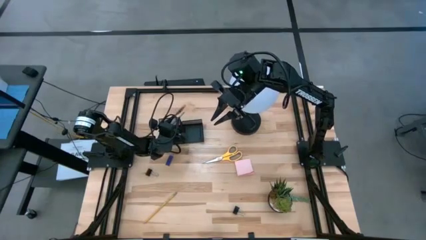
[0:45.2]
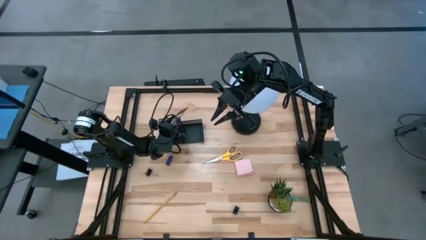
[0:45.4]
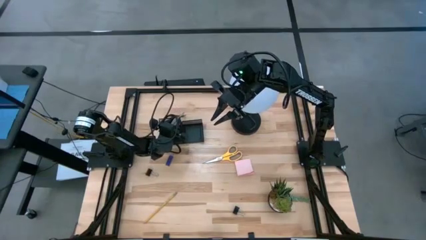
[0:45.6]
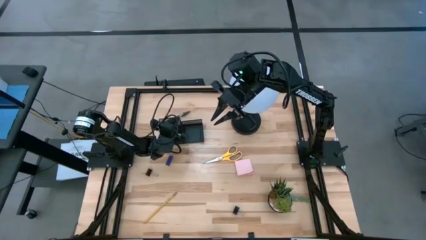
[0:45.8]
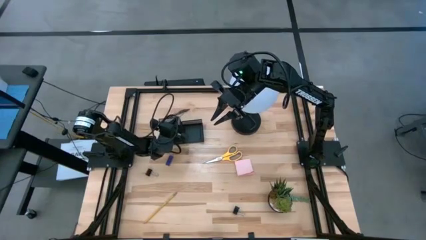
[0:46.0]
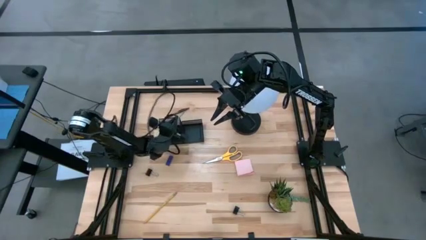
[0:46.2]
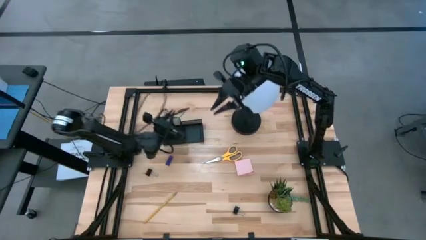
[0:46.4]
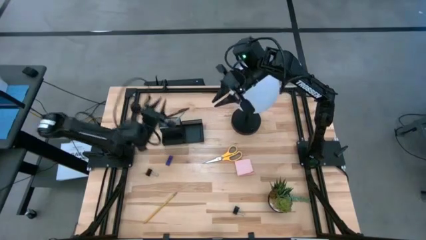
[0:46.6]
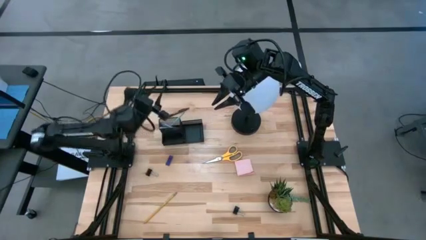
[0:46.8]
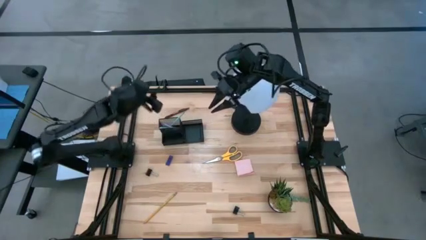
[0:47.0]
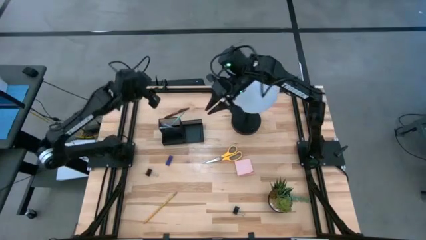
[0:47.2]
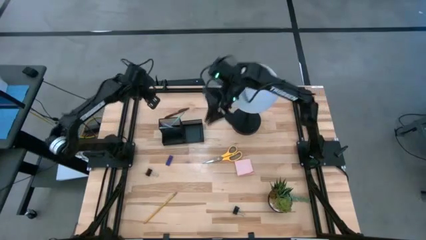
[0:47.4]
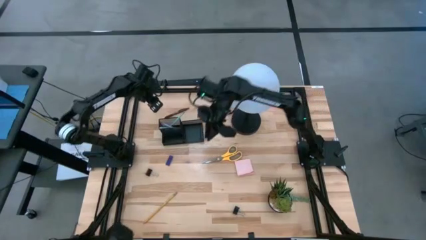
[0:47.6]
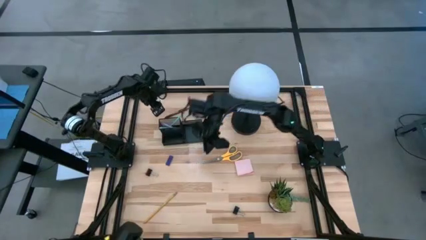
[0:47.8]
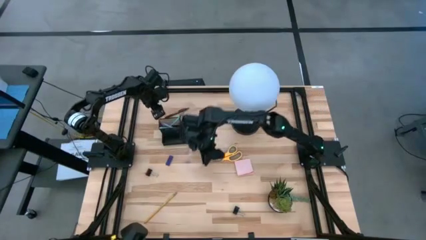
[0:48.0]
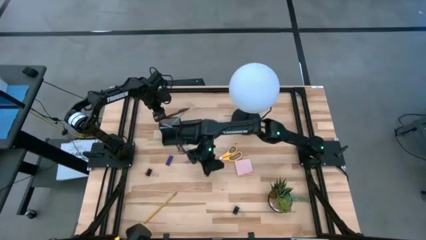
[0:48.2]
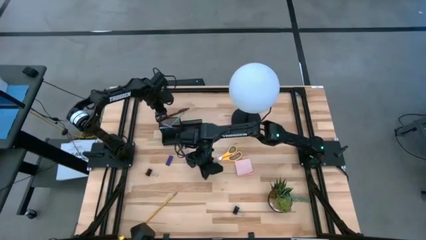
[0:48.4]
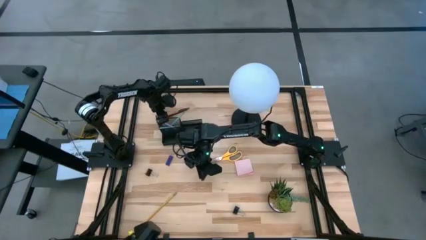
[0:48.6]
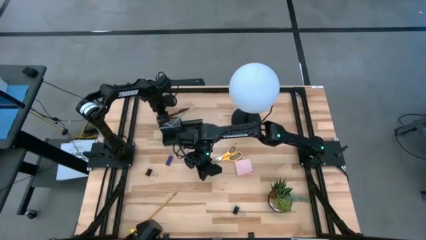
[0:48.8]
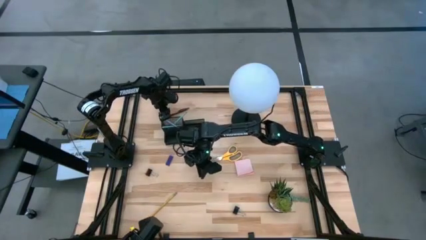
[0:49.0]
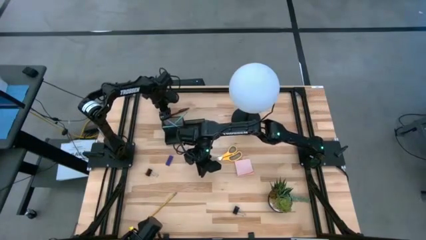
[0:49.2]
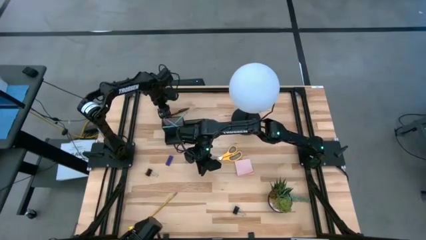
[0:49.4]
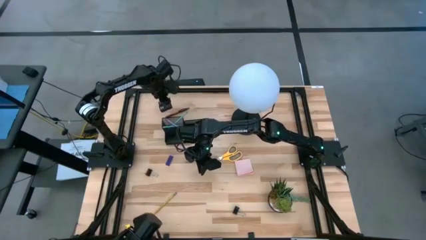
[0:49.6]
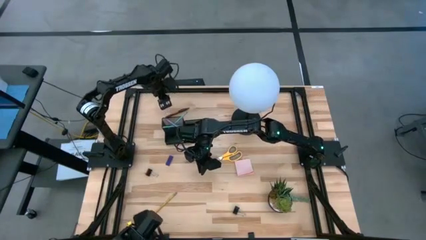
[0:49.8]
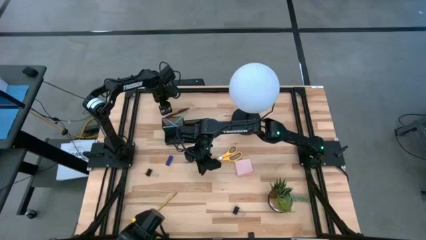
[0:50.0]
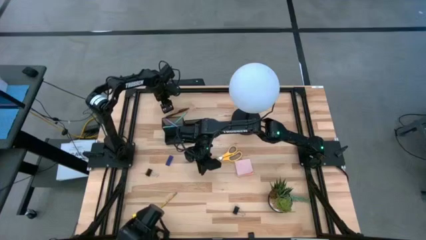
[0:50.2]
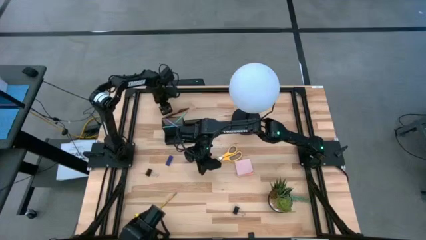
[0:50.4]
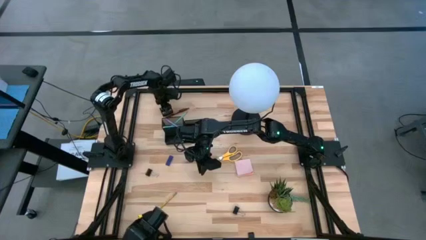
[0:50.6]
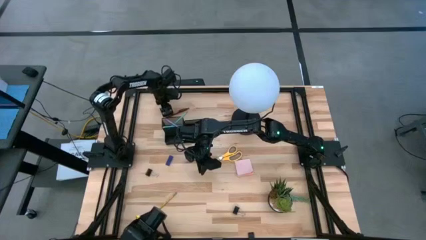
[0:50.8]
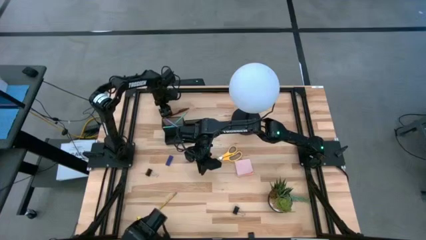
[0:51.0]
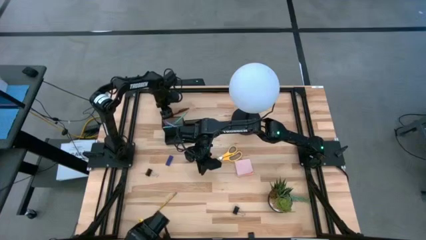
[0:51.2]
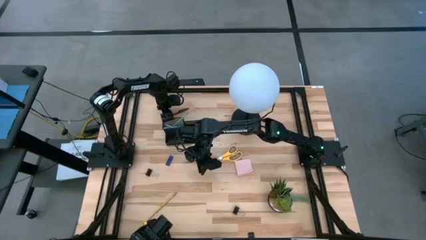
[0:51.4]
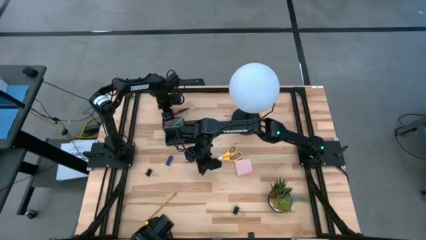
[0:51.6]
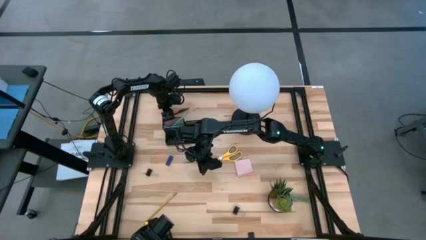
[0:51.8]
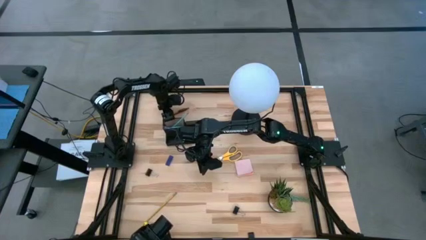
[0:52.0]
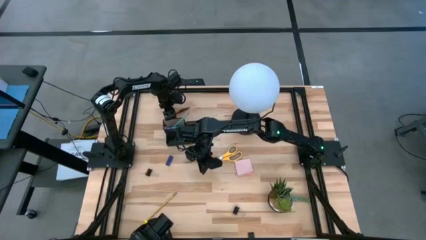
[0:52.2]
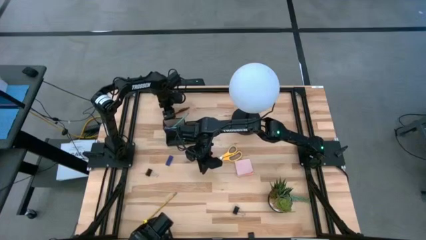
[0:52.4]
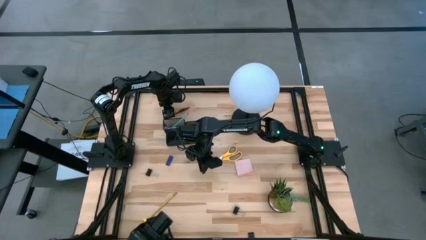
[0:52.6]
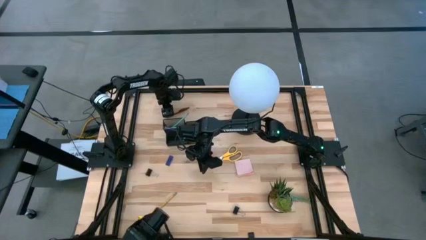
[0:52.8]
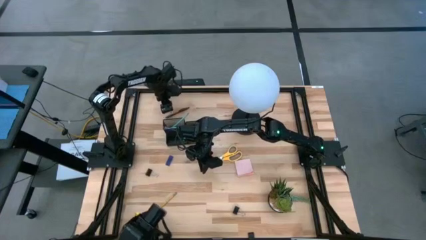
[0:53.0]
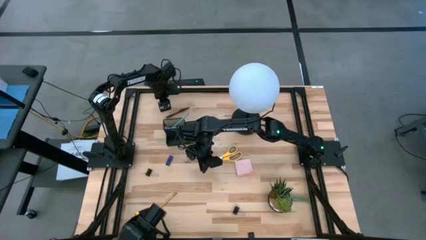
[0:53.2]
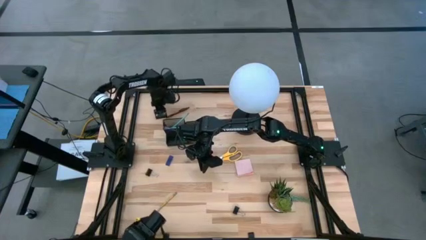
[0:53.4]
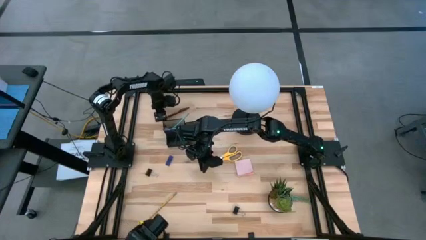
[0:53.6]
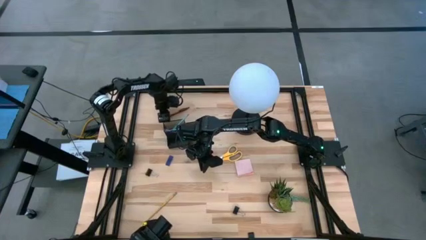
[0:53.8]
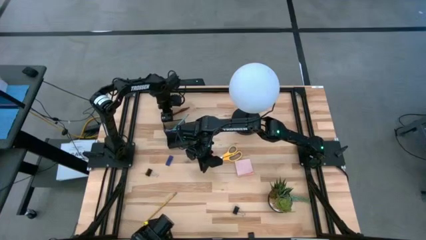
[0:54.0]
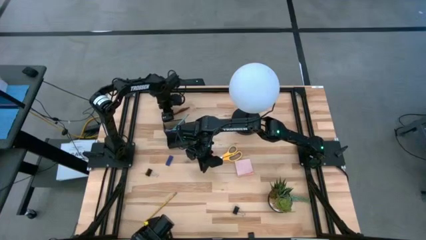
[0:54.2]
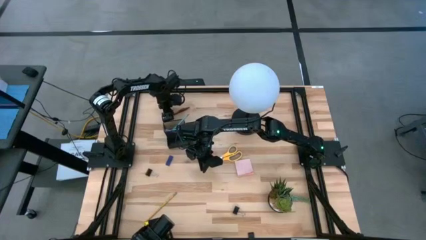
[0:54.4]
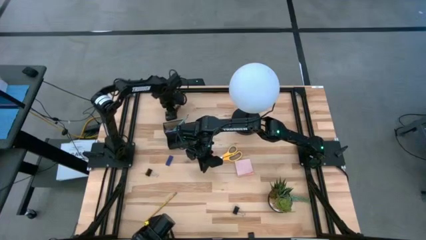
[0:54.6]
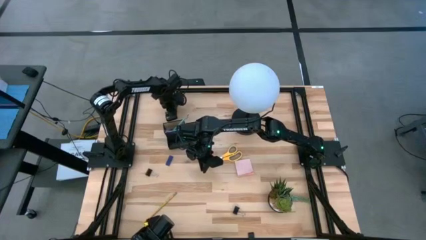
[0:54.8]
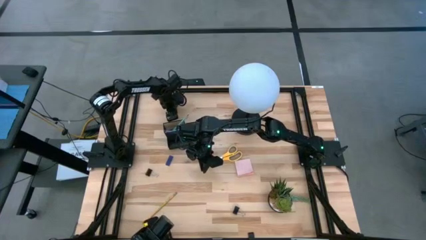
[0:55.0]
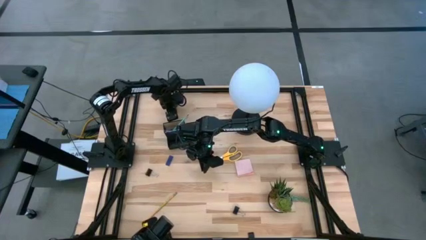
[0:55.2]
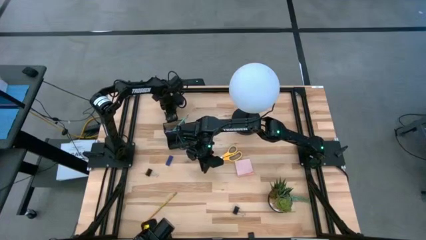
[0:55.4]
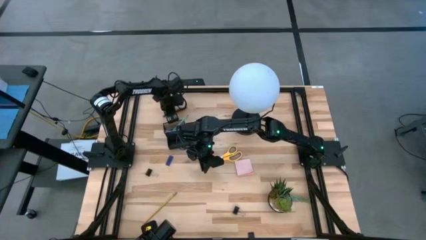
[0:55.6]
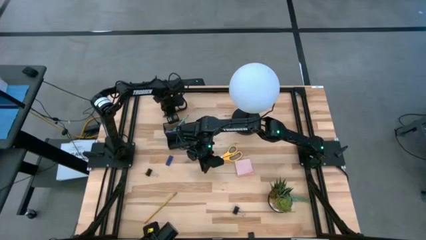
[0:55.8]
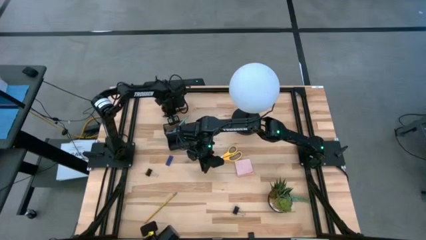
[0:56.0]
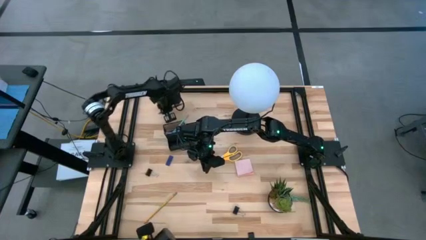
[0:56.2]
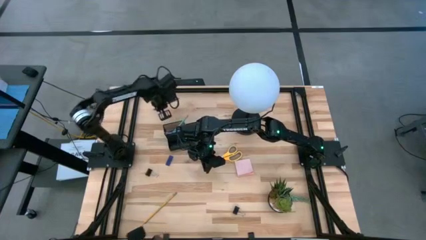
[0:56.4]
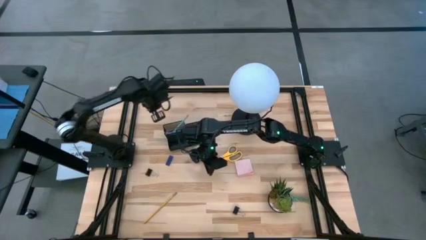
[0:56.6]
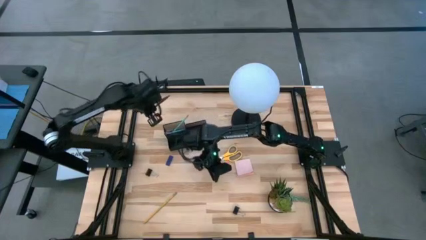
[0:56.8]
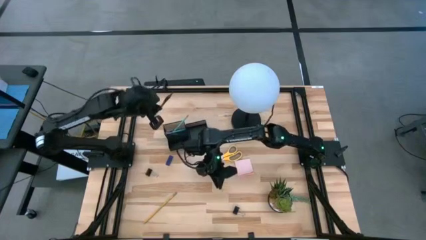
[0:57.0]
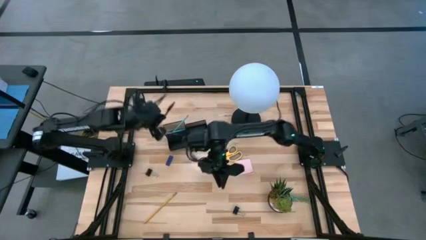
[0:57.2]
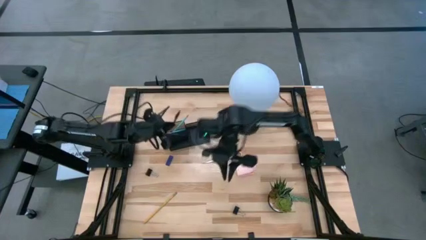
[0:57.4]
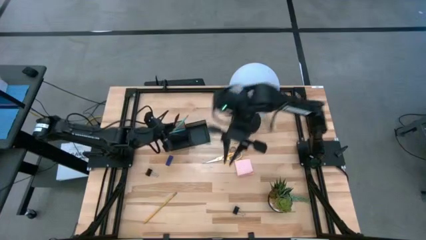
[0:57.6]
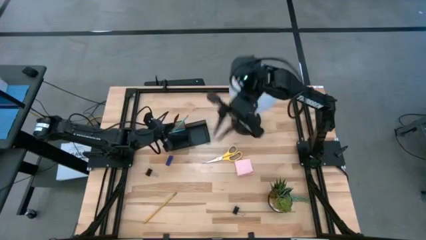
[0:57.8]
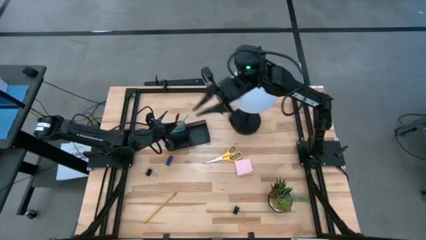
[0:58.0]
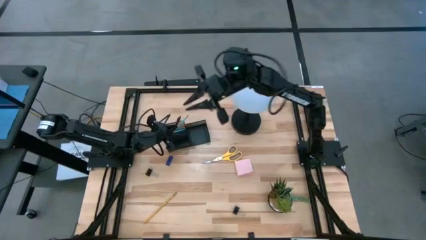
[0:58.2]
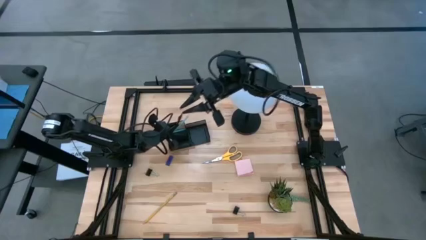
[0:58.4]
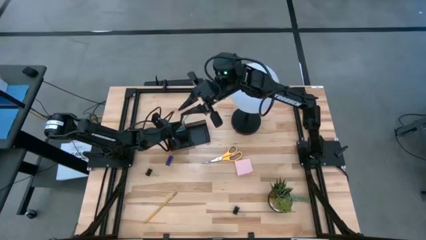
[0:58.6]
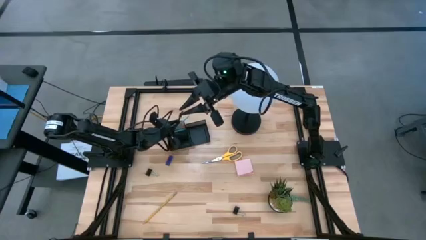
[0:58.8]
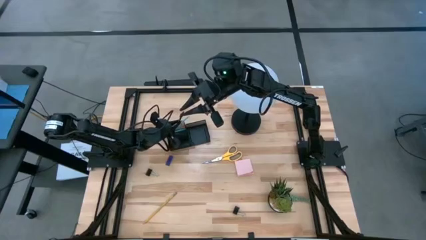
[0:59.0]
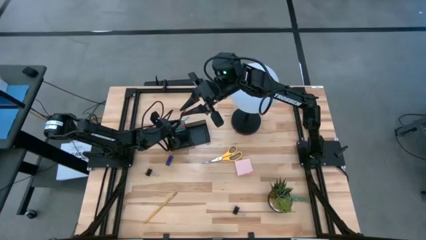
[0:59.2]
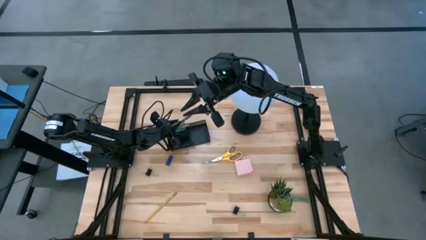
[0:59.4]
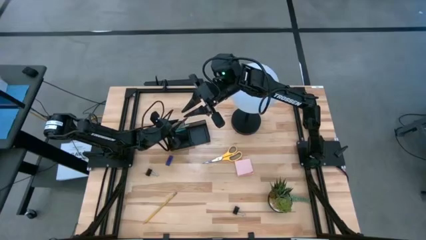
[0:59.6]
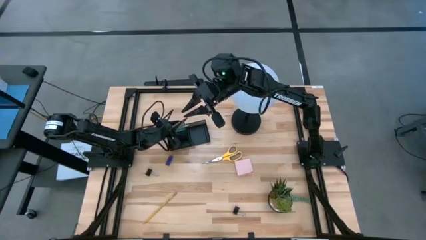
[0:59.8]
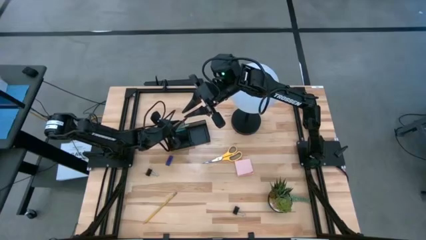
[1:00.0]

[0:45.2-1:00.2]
Task: Pick and place office supplies into organizer
Put the brown pen into the black desk organizer

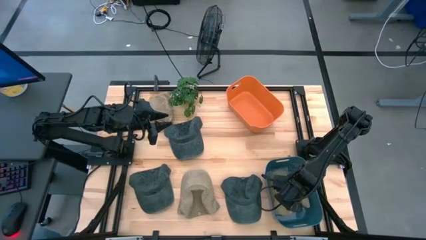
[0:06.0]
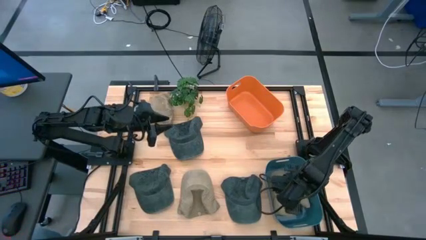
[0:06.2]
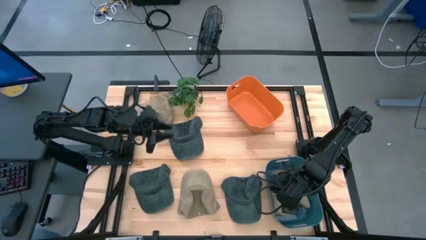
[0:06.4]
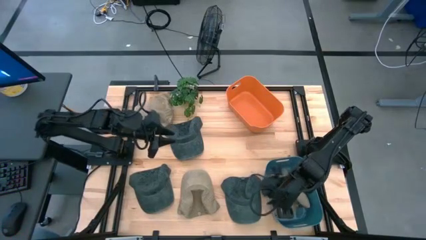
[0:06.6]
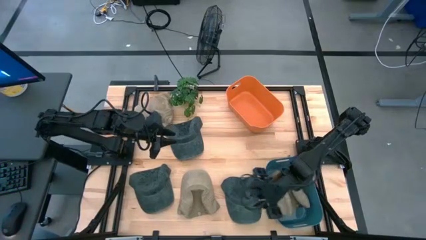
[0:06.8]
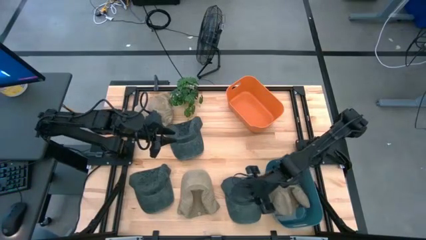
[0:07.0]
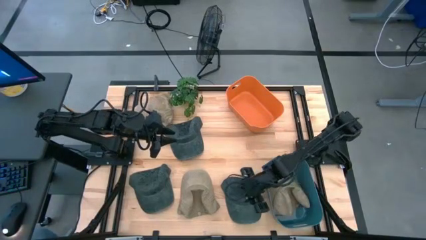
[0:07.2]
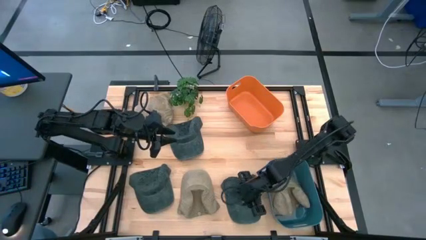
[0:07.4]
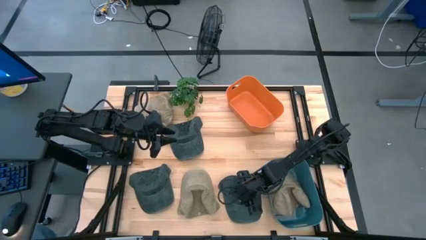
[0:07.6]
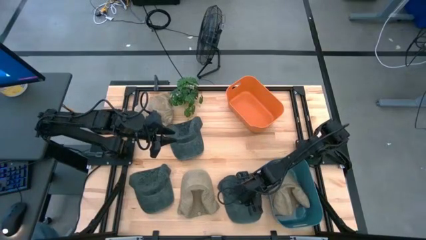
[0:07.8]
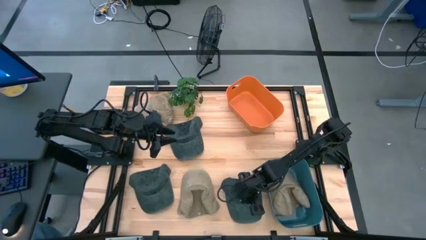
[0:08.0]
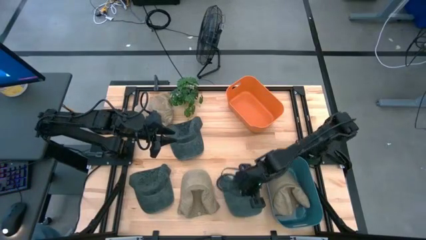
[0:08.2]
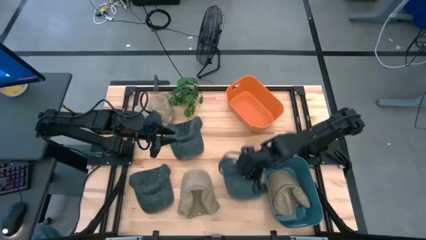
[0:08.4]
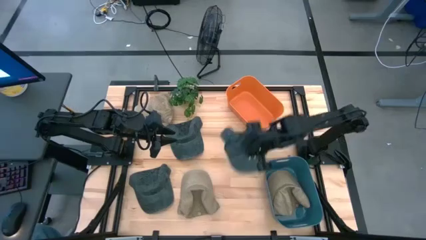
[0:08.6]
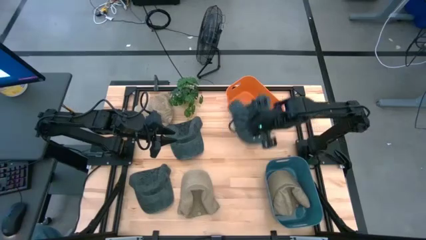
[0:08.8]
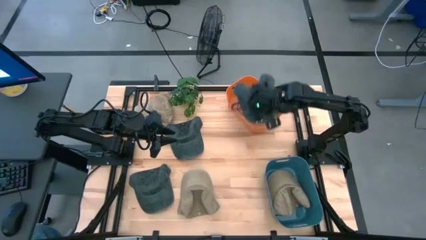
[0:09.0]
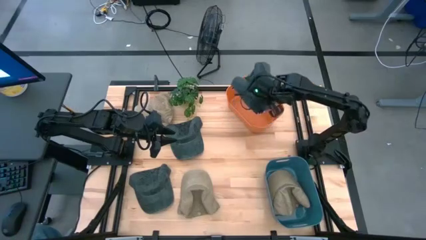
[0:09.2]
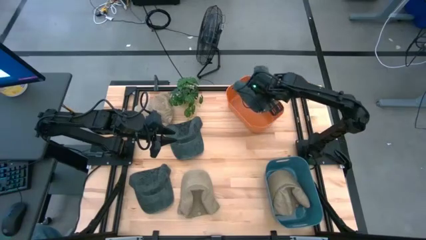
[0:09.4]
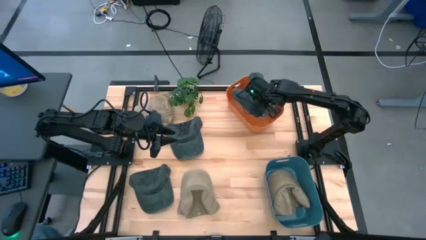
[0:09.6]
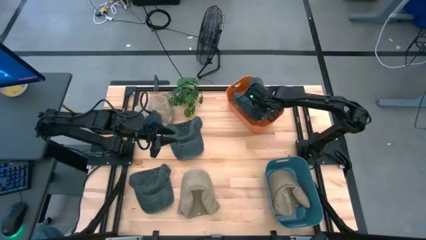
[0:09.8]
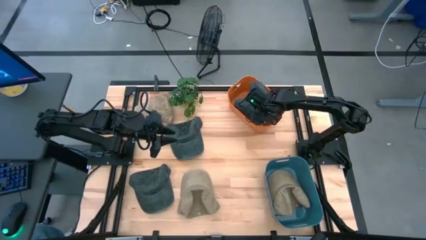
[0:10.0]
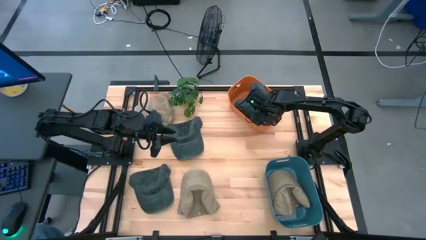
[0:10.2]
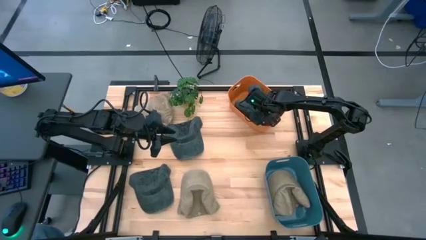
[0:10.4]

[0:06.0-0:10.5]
Task: Pick & Place hat
Put the bottom right gray cap into the orange bin
